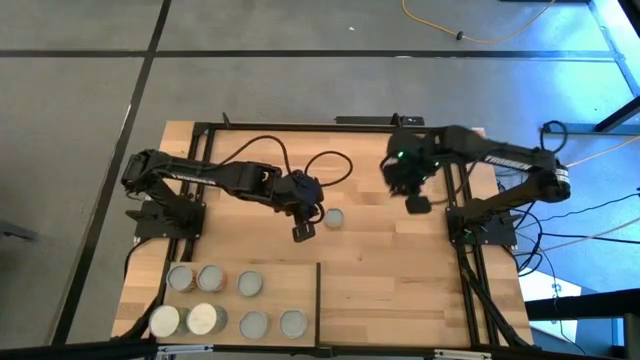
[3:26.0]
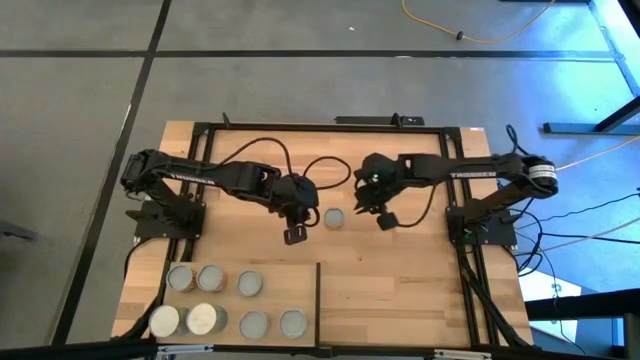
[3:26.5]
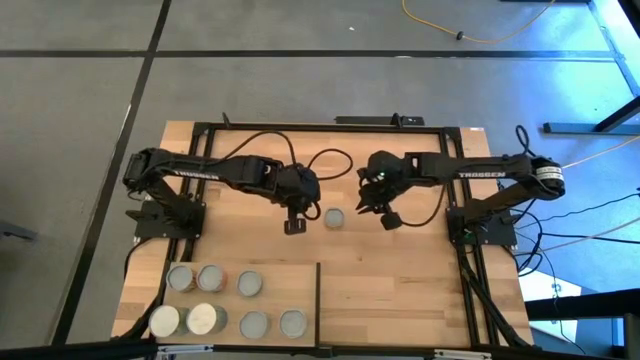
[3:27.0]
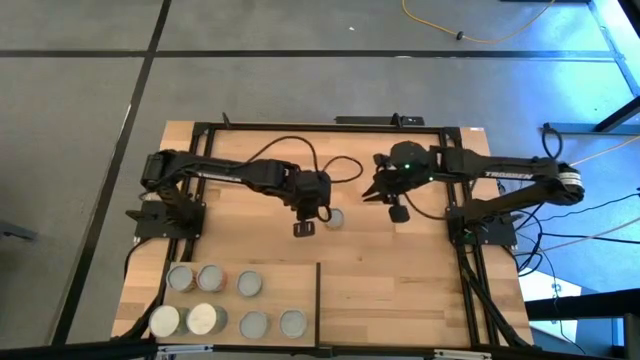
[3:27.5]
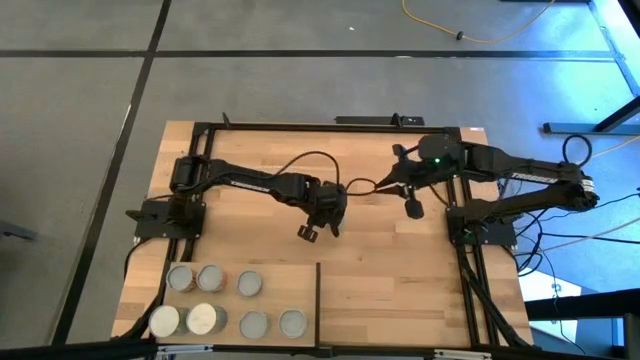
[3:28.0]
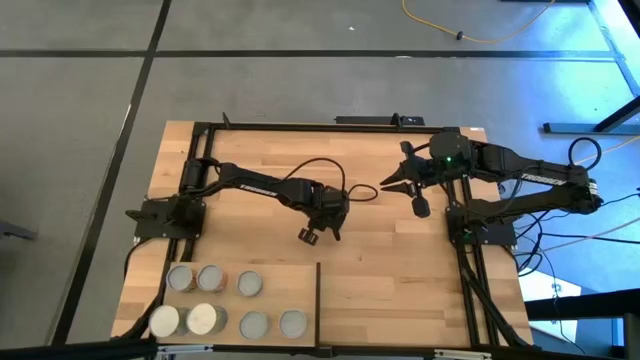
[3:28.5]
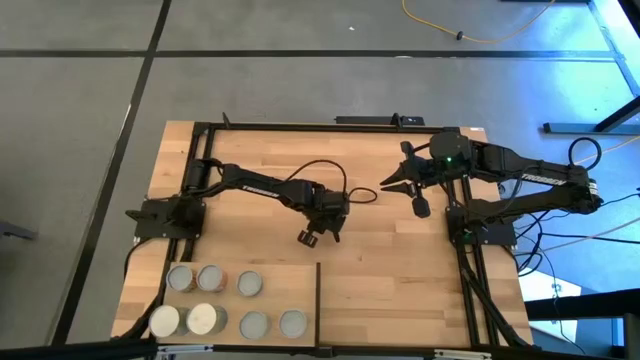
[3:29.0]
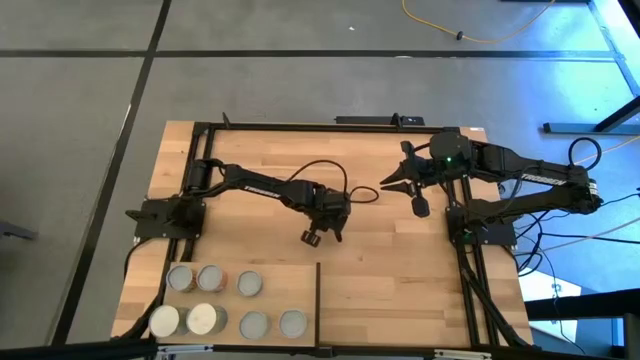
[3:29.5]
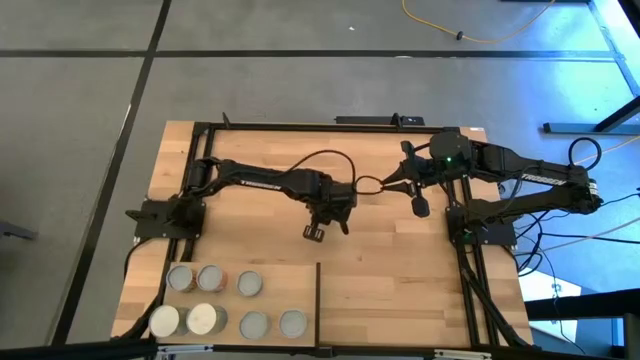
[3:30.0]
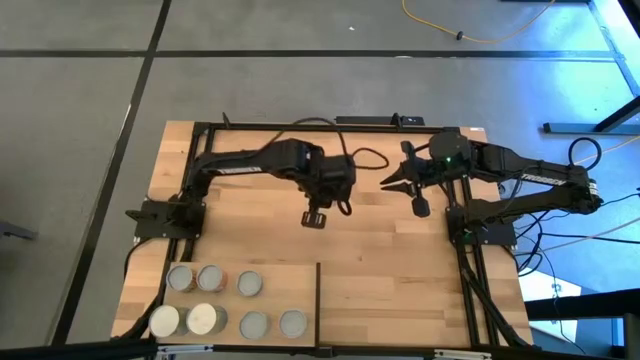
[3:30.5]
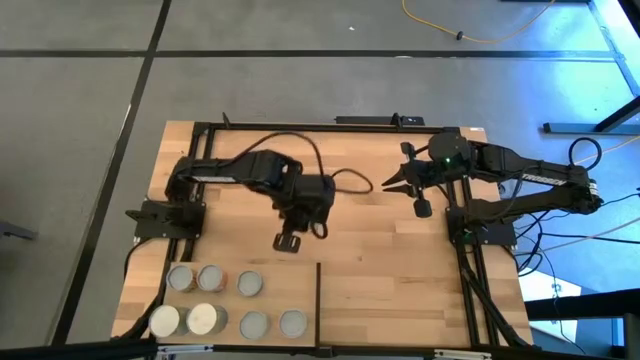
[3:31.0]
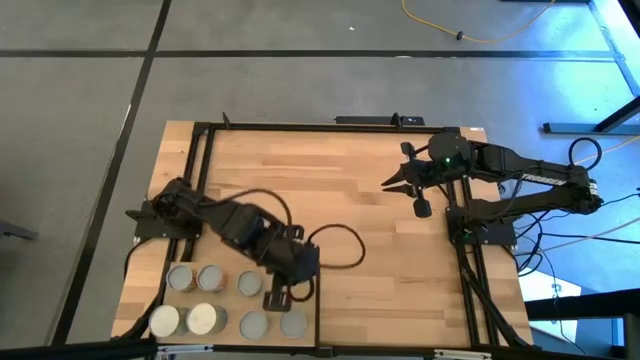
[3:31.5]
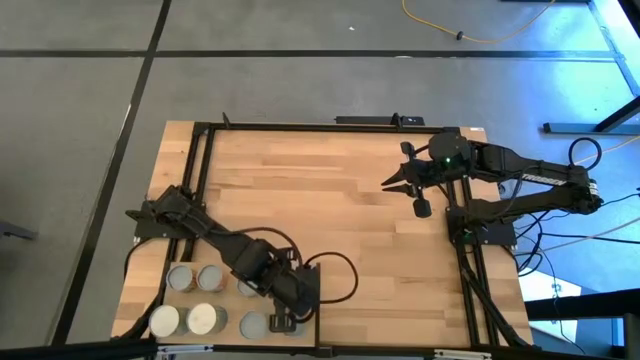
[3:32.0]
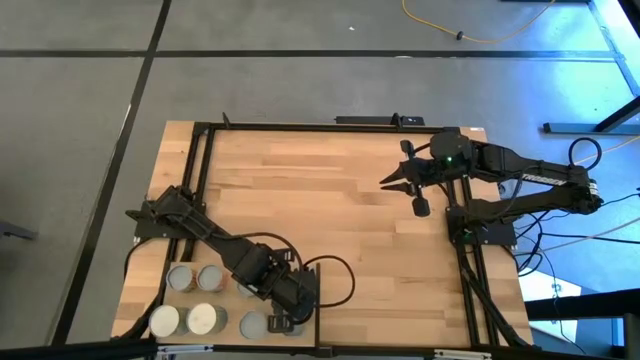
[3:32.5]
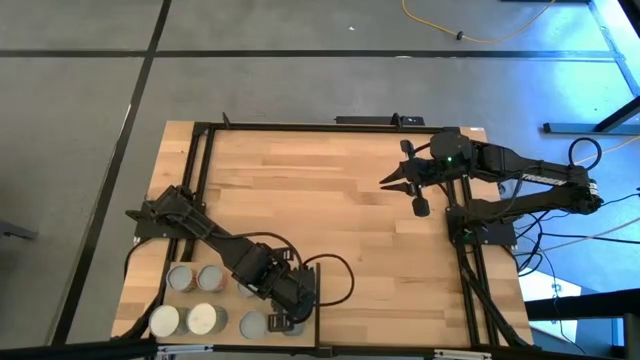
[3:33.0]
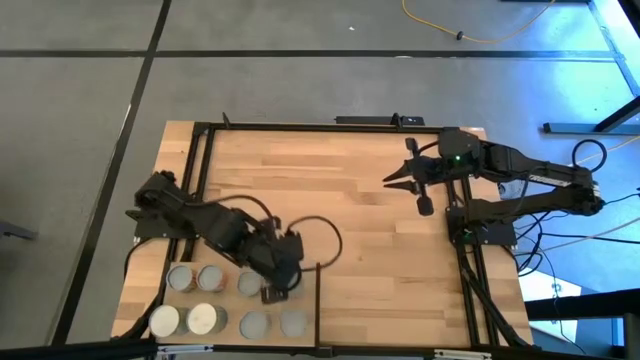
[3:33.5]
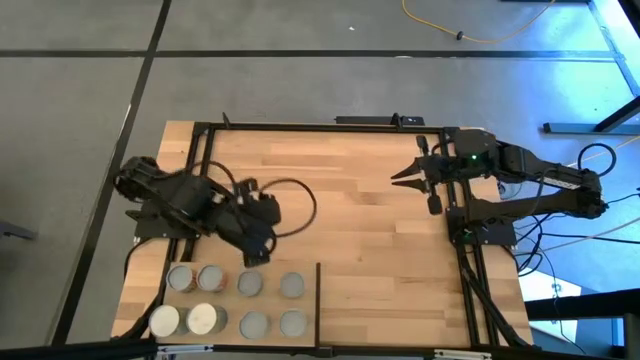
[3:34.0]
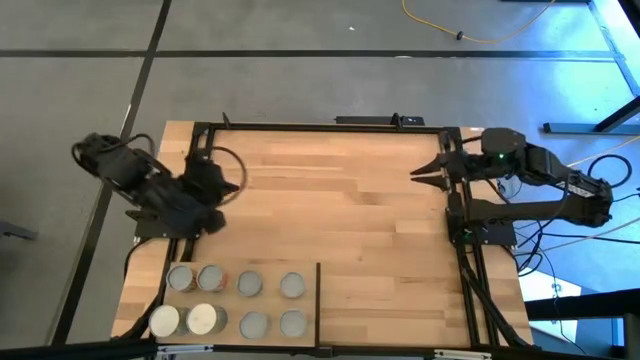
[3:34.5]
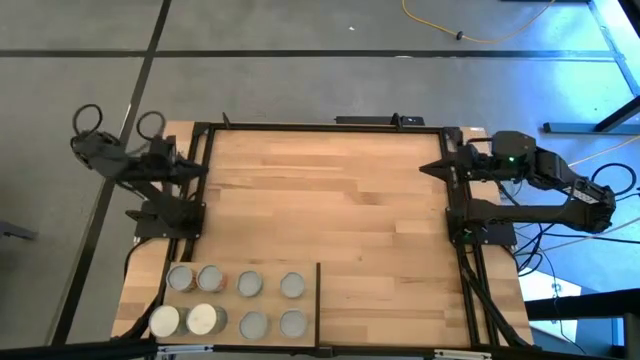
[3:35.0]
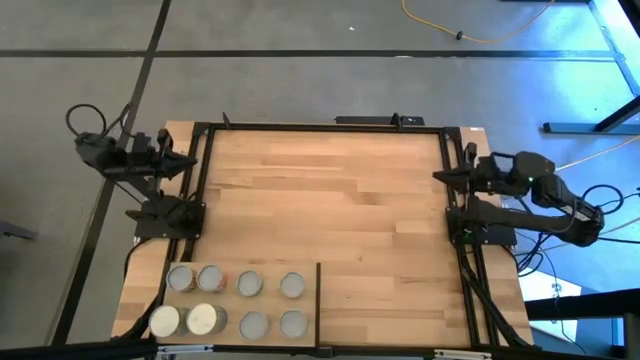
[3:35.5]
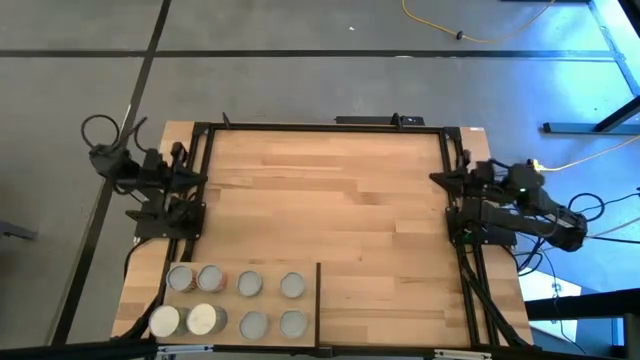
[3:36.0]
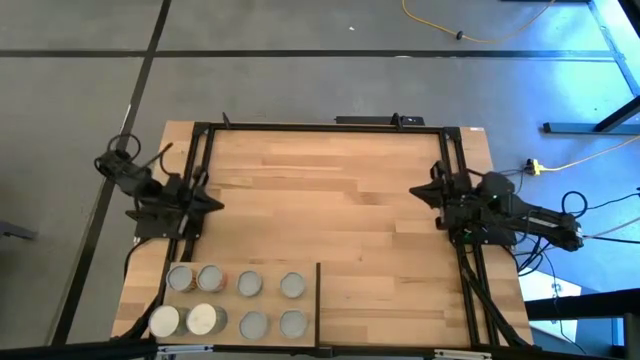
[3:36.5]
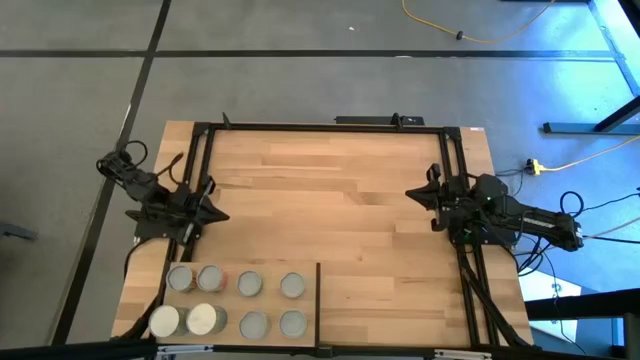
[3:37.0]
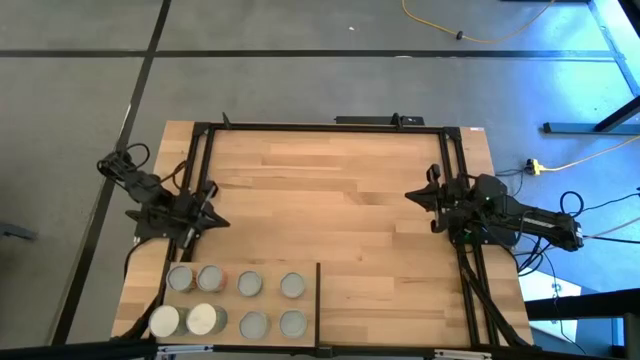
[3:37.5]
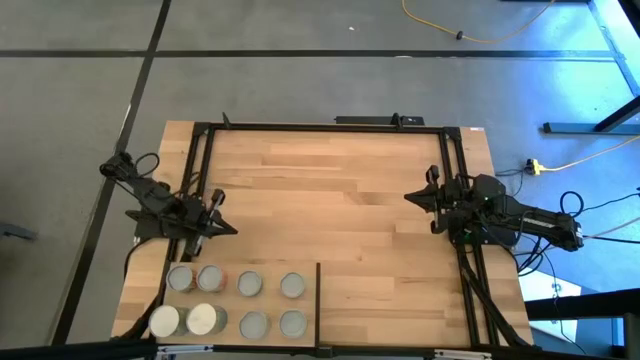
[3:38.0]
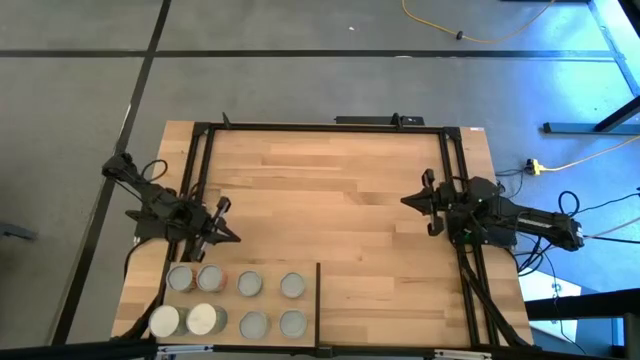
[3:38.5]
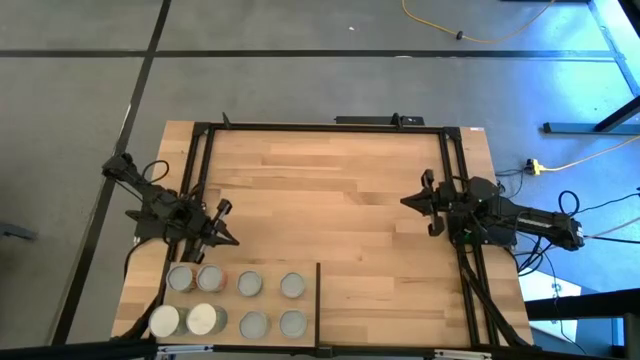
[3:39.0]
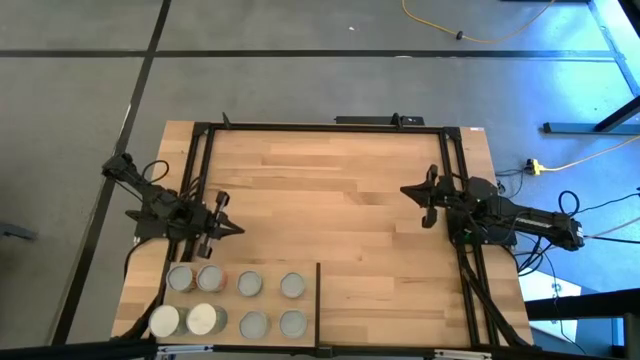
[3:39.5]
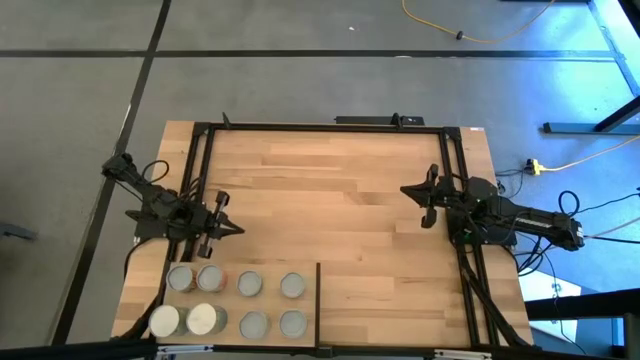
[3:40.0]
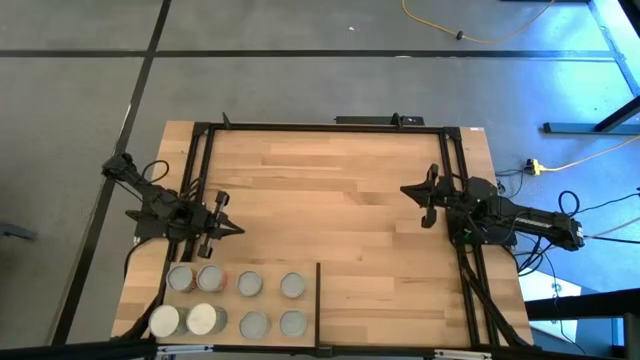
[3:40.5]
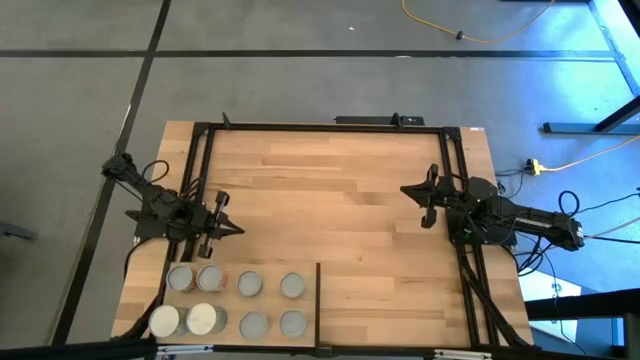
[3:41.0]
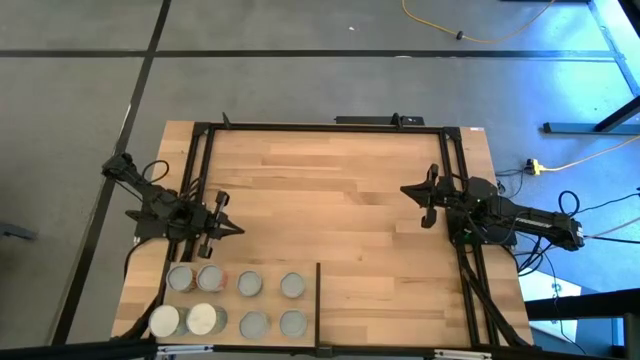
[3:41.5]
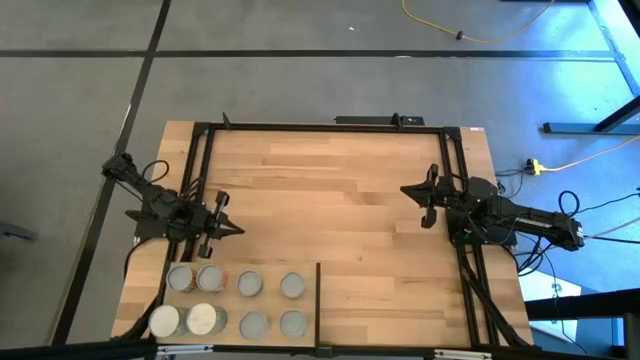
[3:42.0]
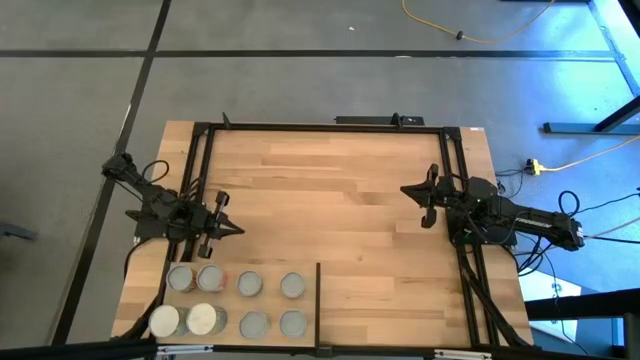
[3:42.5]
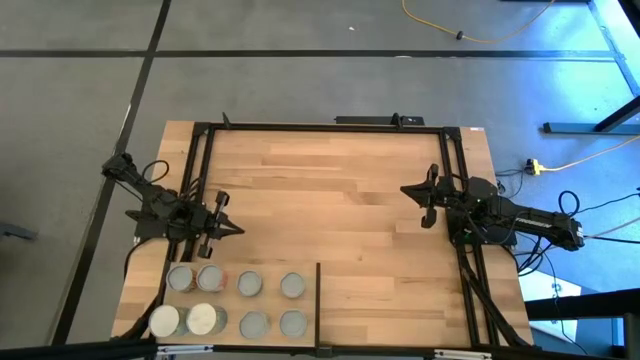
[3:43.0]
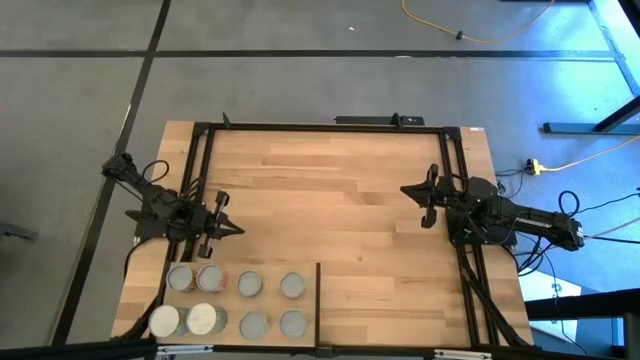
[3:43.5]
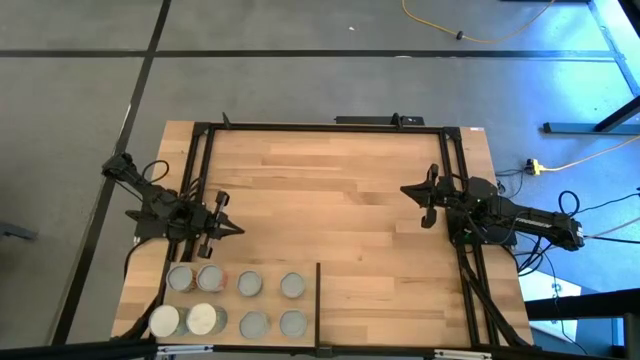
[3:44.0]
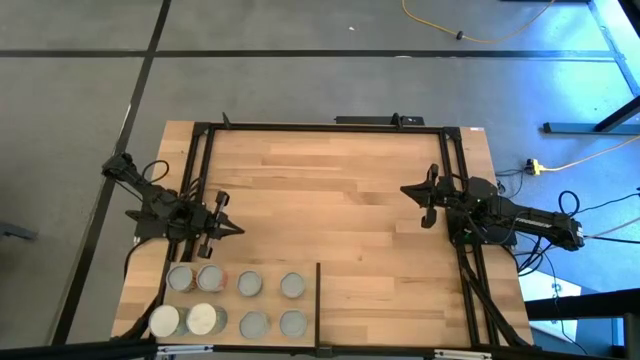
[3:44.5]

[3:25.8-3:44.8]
Task: Pick and place cans onto a shelf
Return to Home Position

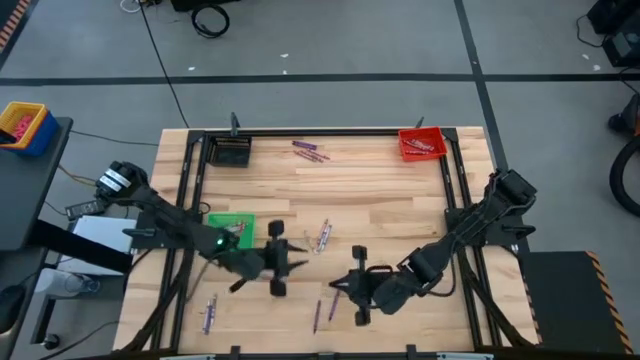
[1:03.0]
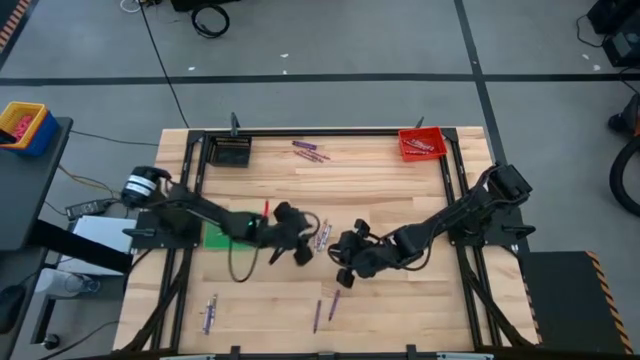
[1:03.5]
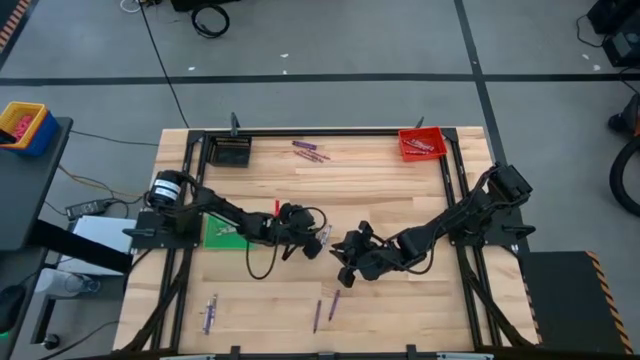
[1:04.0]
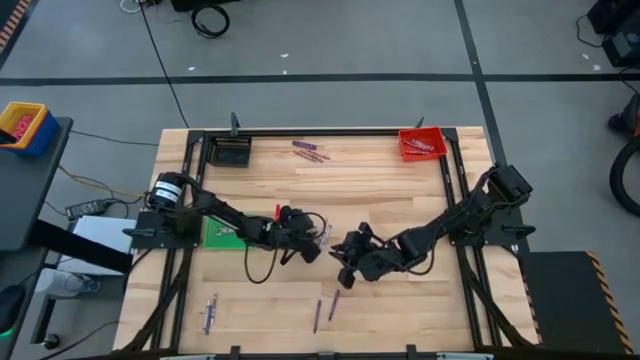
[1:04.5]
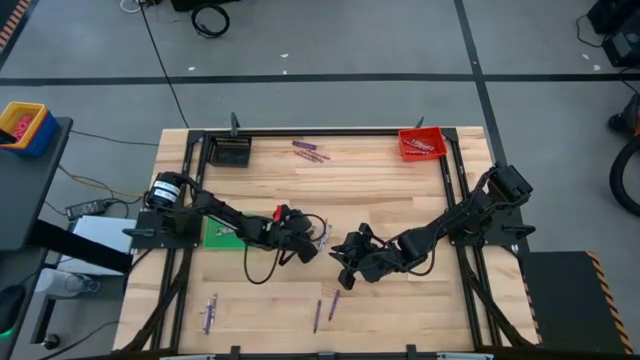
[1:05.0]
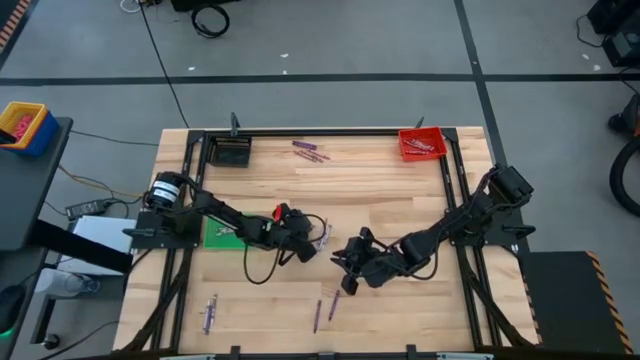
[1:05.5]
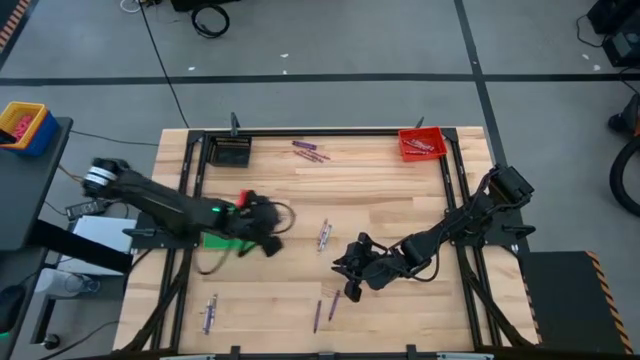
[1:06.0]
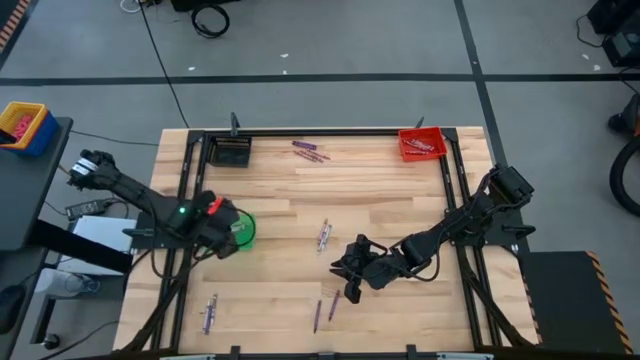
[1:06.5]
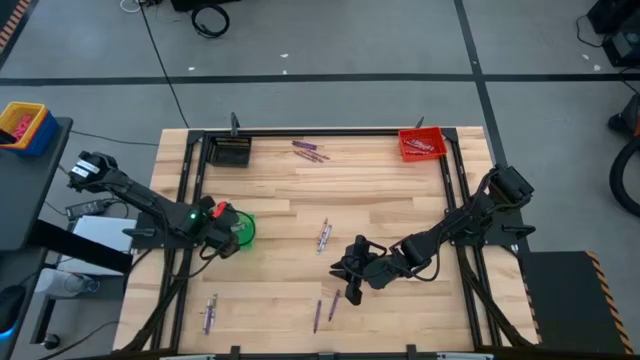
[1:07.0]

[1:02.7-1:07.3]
Task: Sort crayons
Put the white crayon into the green bin
